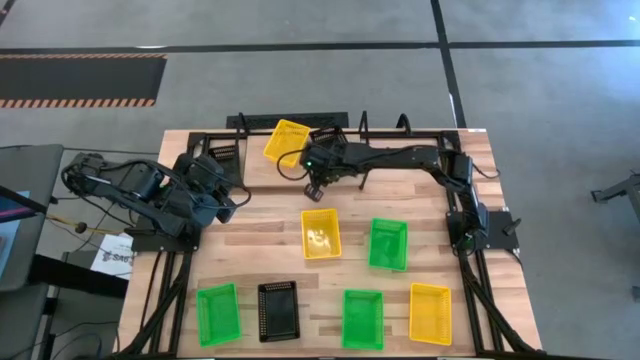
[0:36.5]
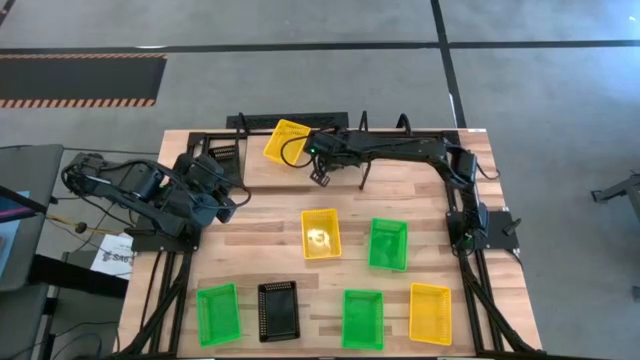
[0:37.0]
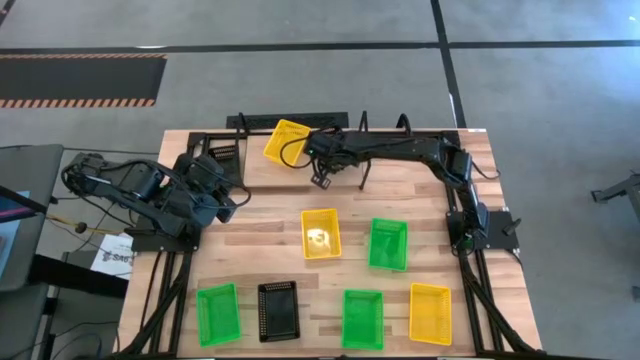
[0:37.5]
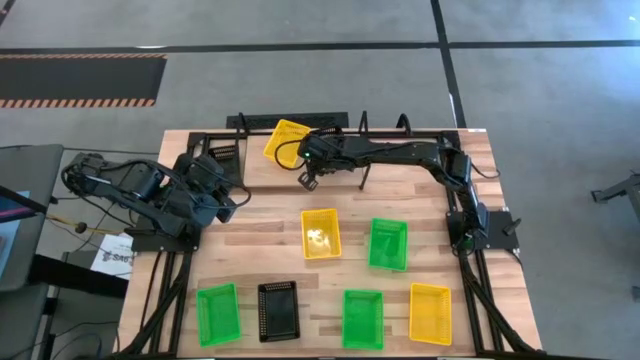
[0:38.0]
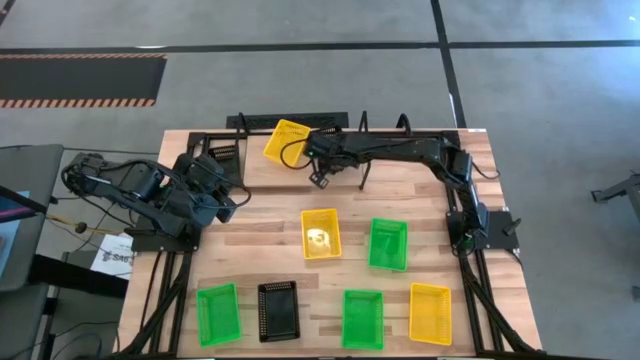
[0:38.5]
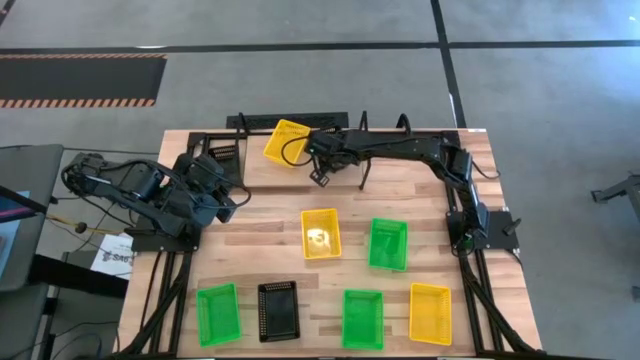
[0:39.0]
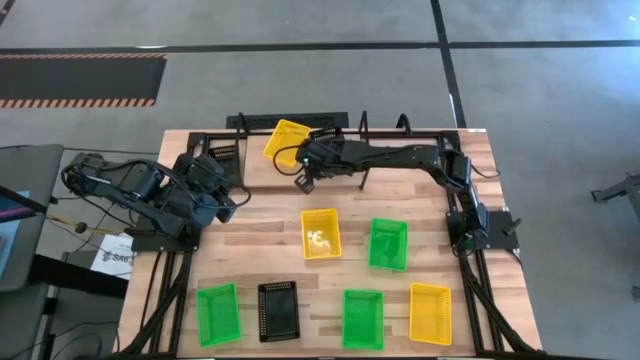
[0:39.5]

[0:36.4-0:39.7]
Task: Stack baskets on shelf by color
Put the top right black bin on the shelf

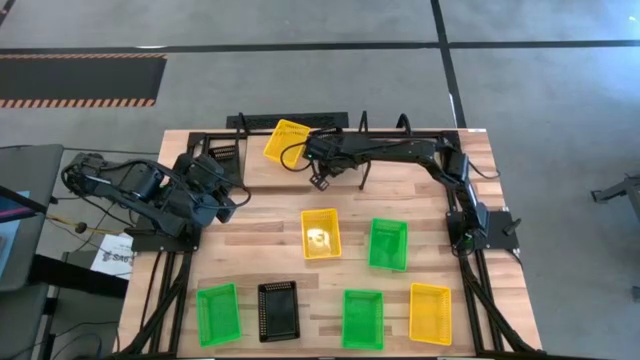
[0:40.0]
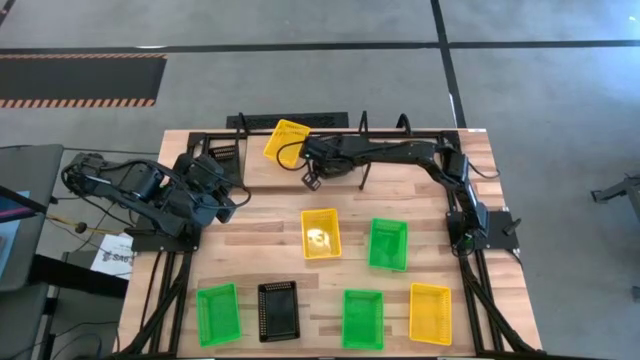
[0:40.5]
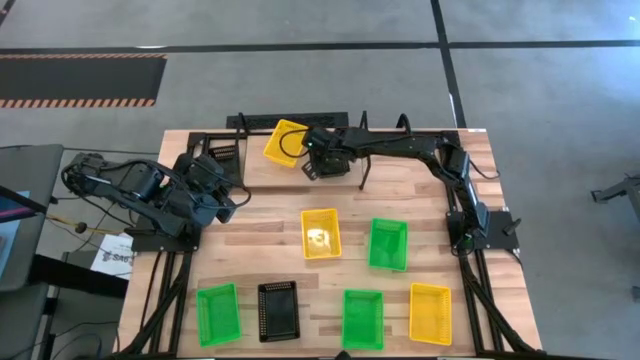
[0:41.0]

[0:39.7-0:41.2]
Put the top right black bin on the shelf

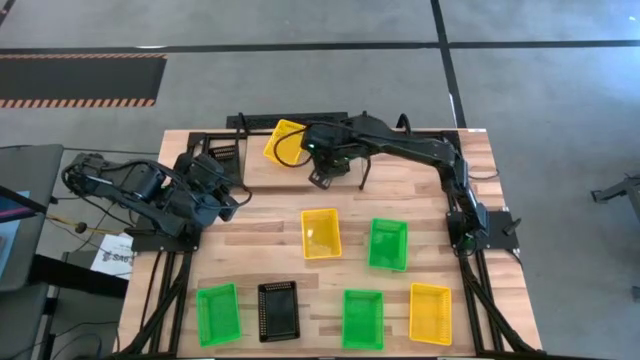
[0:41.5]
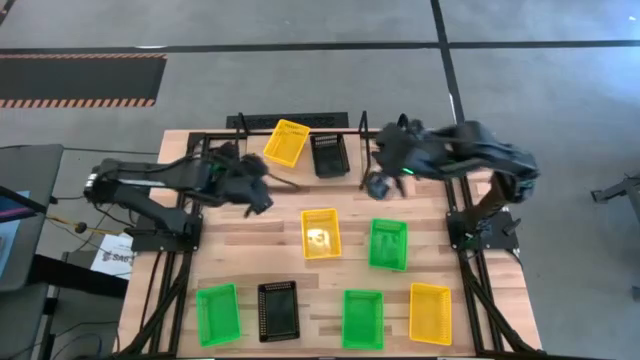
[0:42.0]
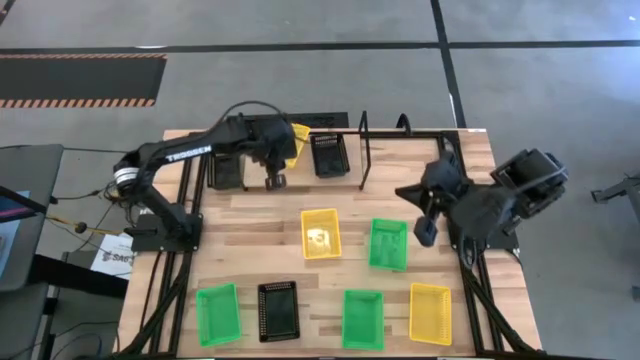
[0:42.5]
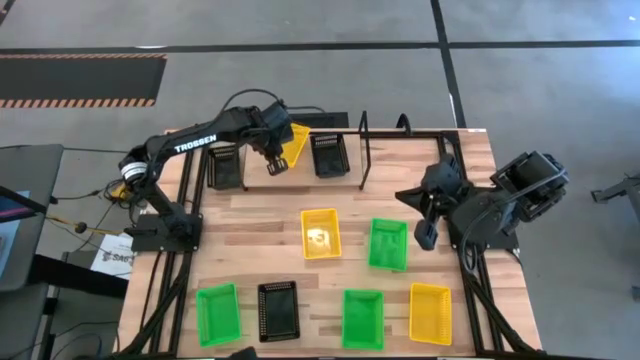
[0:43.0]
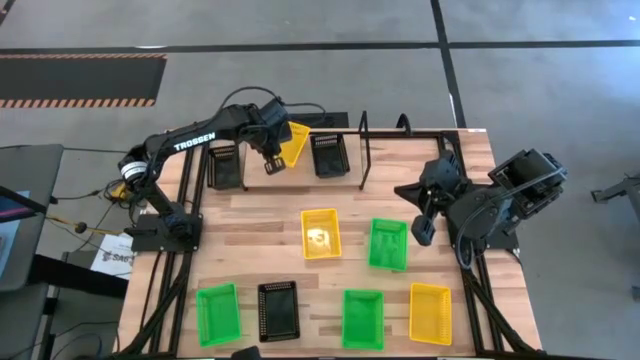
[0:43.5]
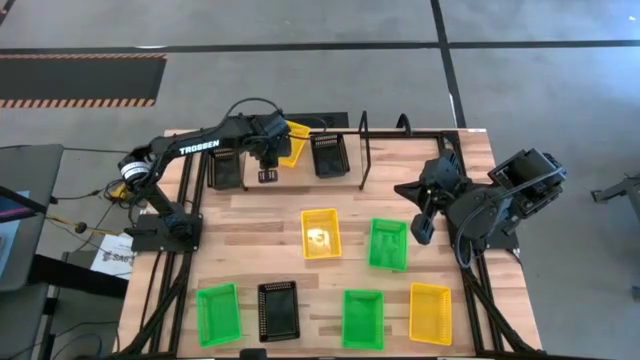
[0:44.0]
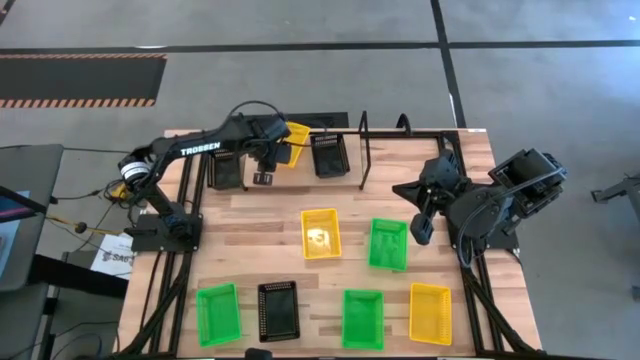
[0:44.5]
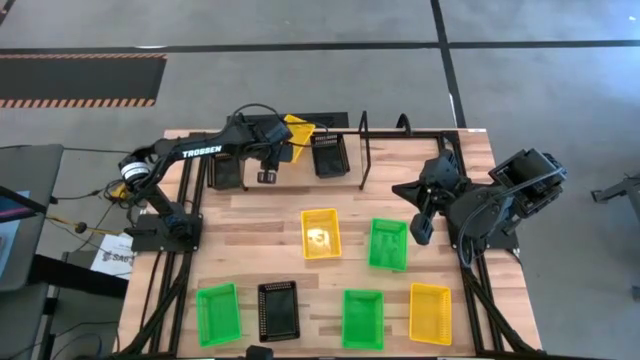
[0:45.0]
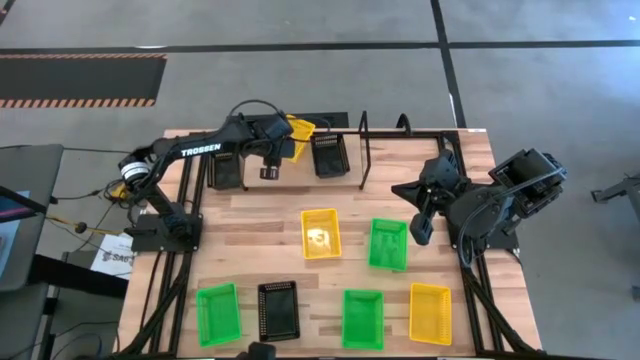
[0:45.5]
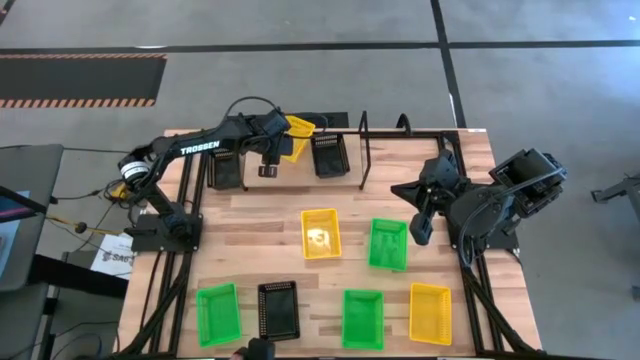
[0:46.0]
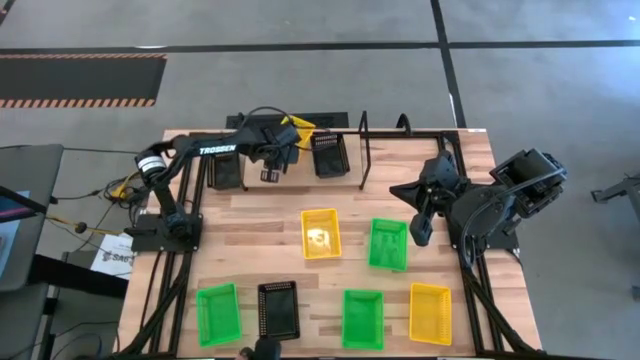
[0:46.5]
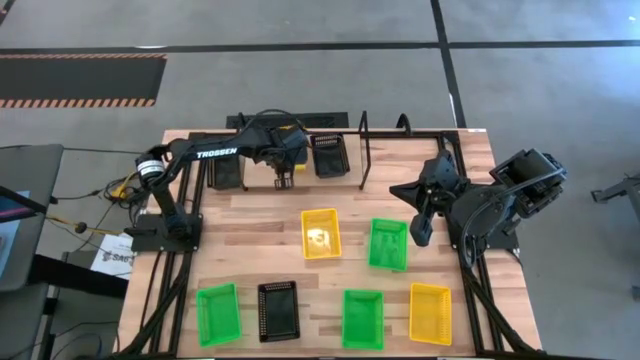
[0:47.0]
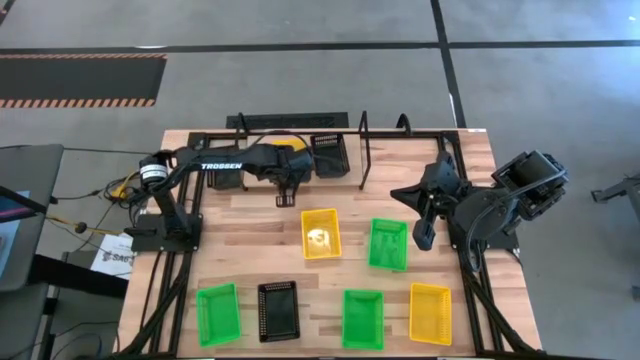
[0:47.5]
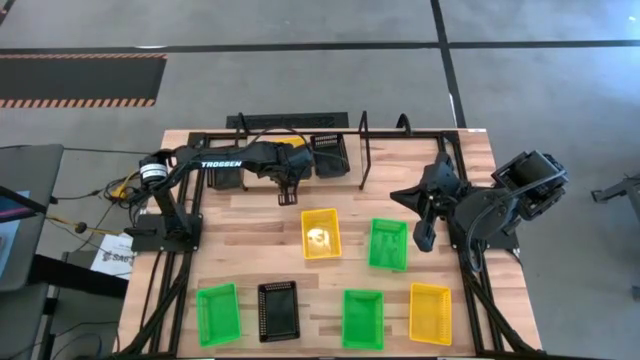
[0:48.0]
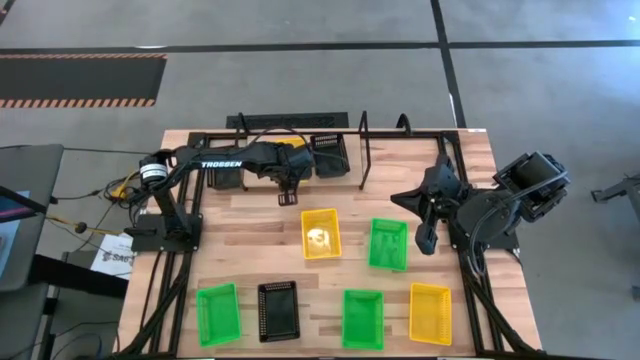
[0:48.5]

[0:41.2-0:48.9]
Adjust the yellow bin on the shelf

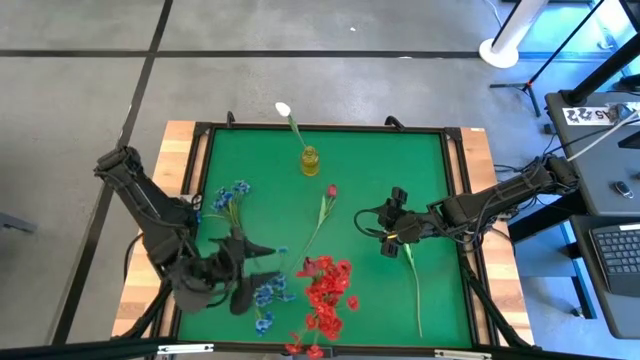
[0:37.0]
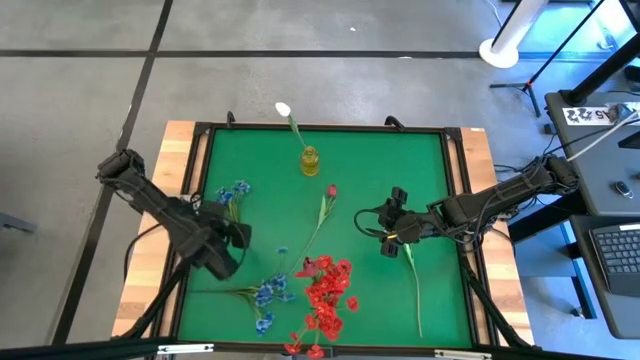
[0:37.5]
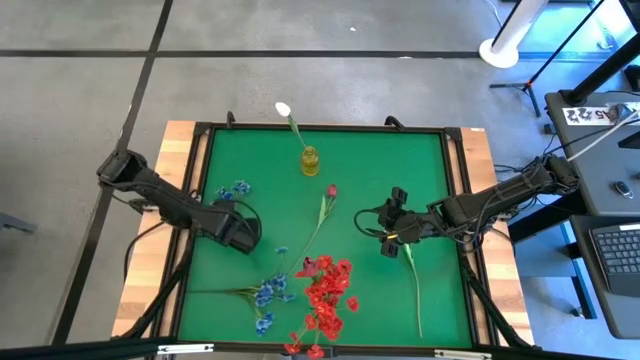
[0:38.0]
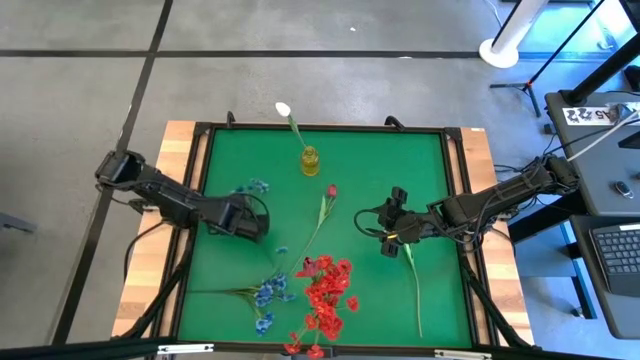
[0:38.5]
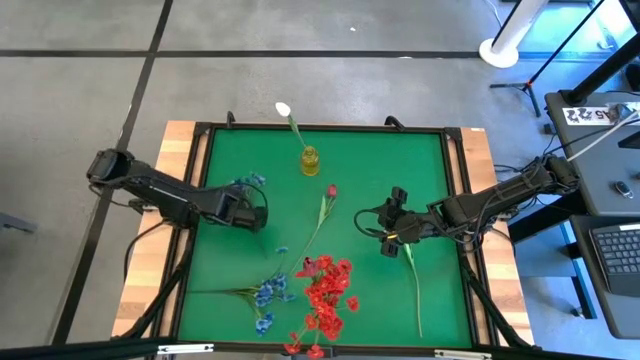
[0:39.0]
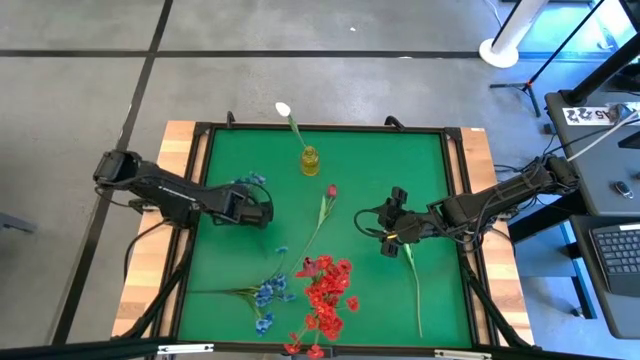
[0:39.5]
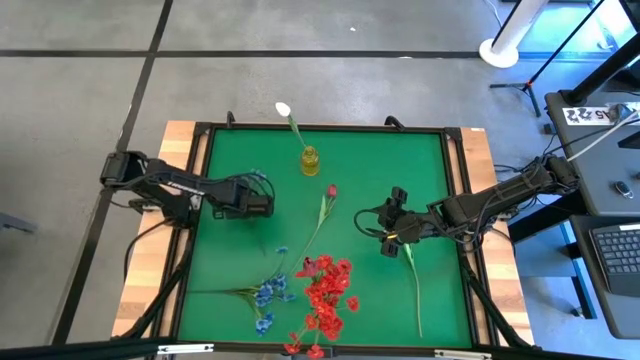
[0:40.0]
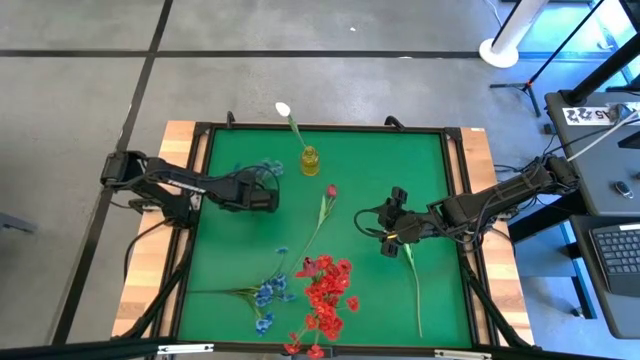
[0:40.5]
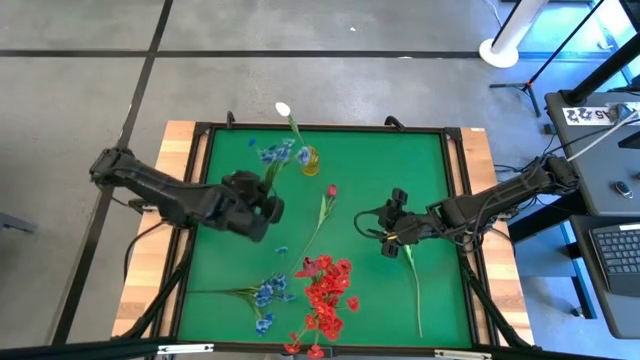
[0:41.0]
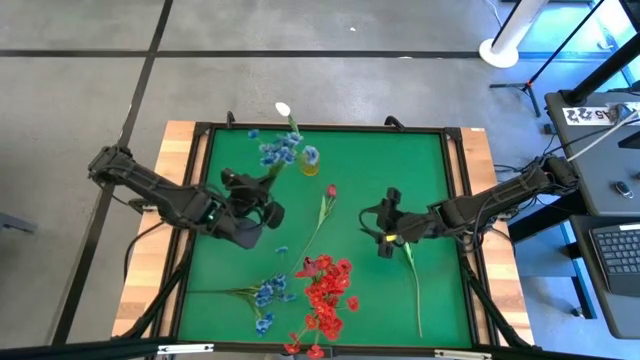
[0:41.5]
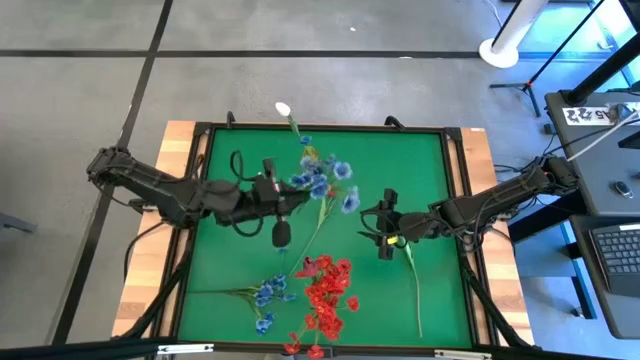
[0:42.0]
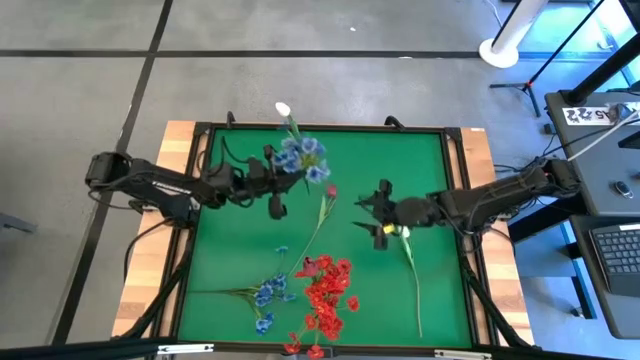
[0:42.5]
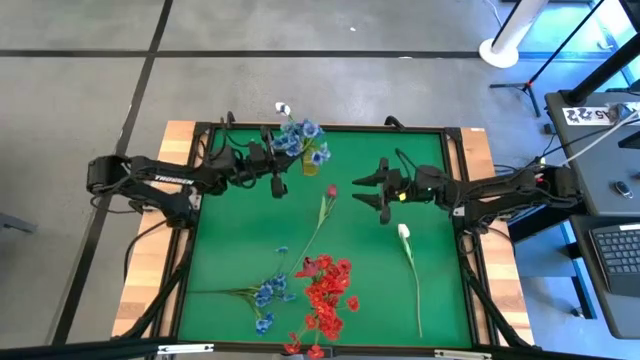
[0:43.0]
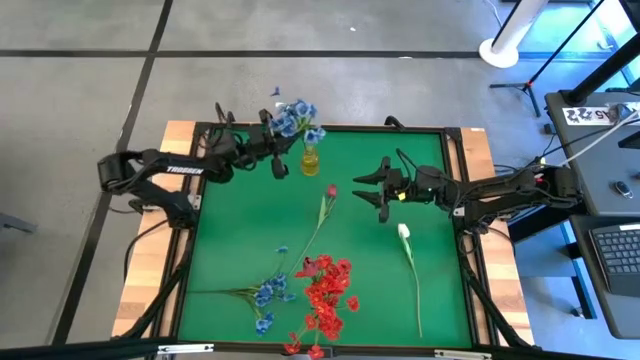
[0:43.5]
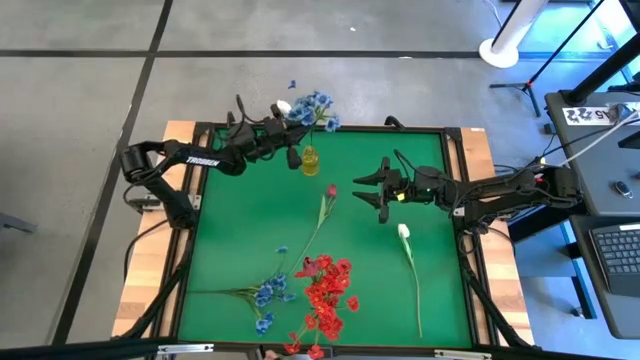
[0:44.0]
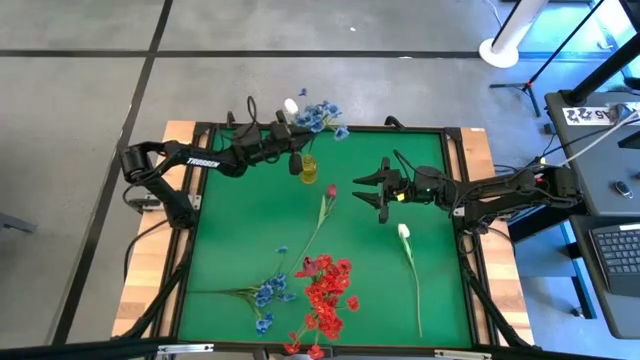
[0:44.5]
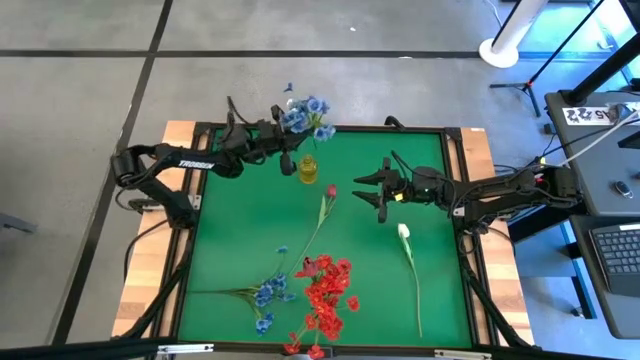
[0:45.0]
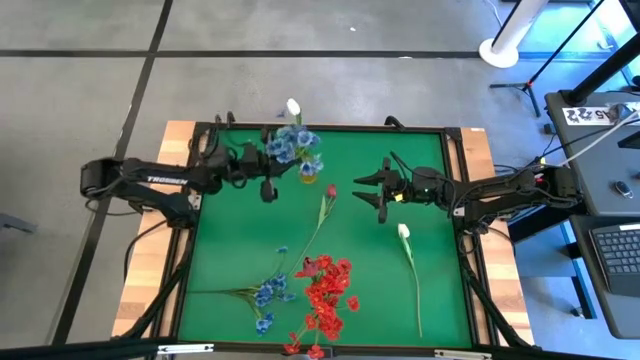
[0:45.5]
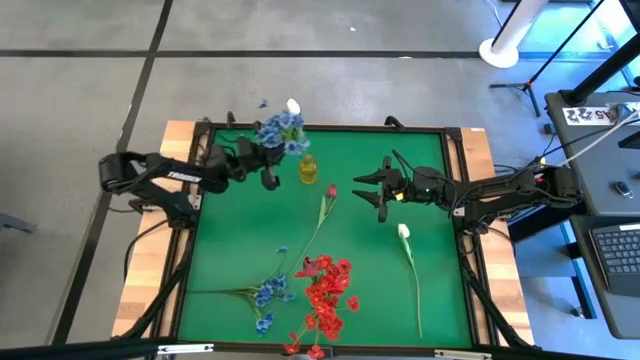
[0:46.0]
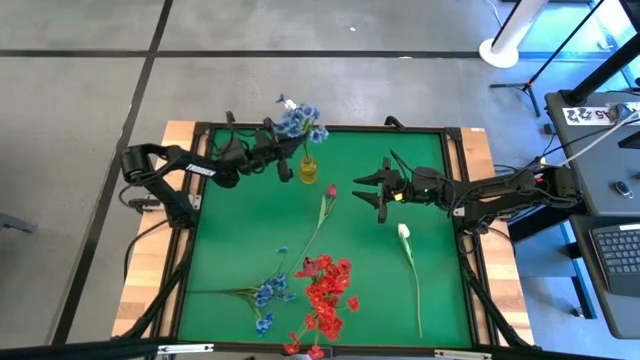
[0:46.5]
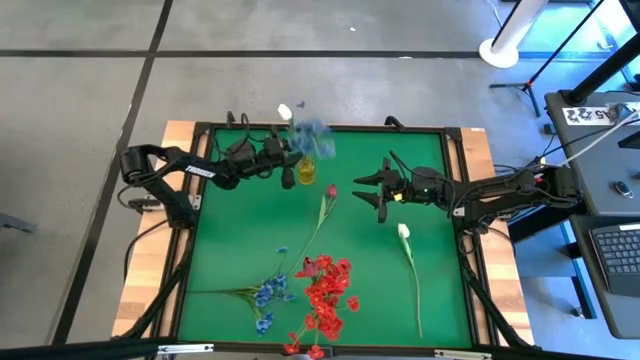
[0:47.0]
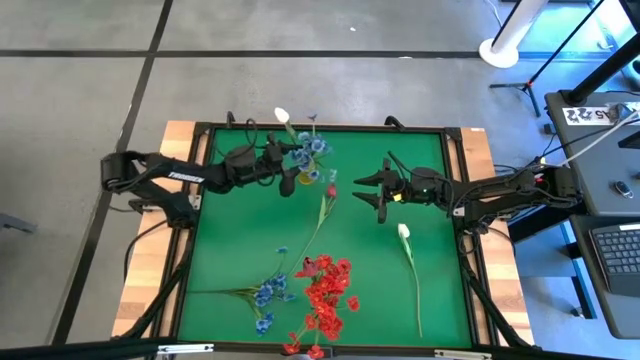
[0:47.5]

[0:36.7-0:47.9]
Task: Sort flowers into vase by color
Put the top blue flower into the yellow vase
